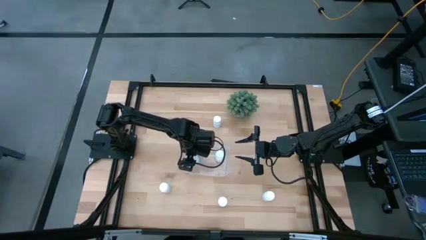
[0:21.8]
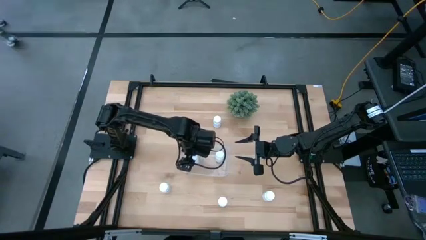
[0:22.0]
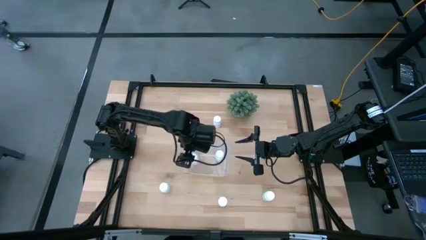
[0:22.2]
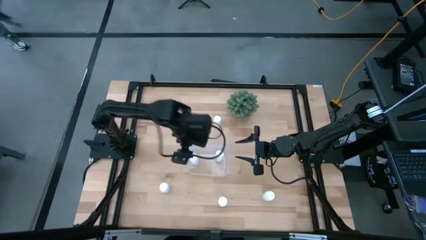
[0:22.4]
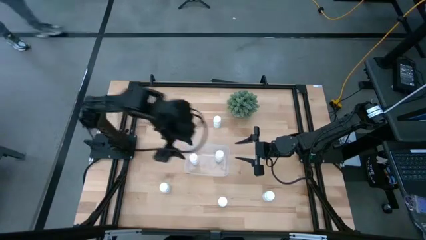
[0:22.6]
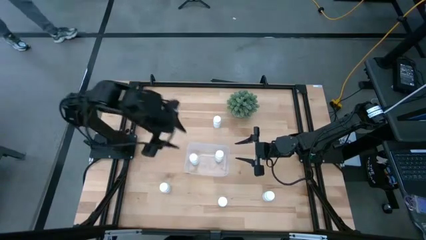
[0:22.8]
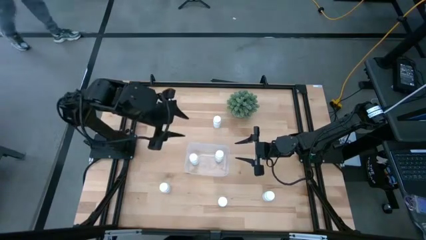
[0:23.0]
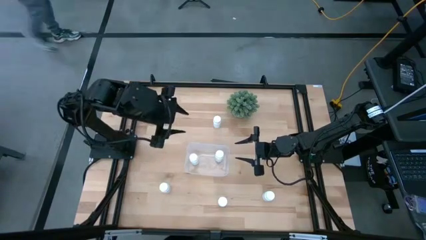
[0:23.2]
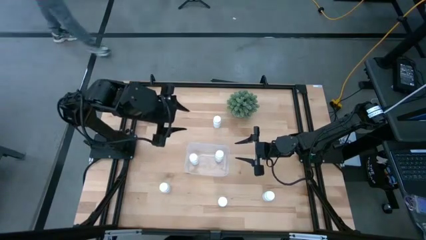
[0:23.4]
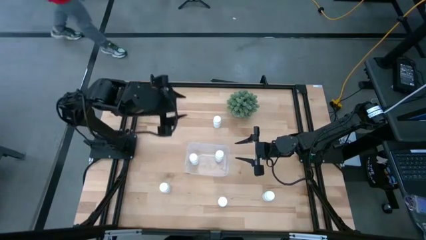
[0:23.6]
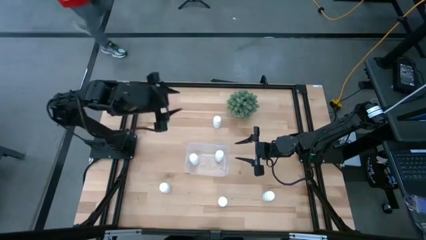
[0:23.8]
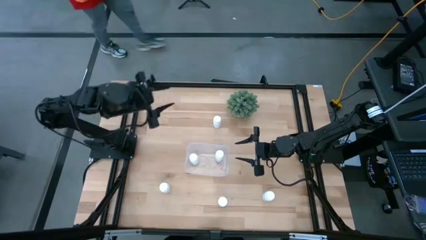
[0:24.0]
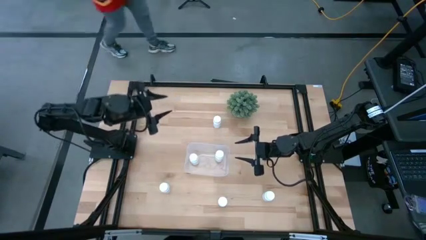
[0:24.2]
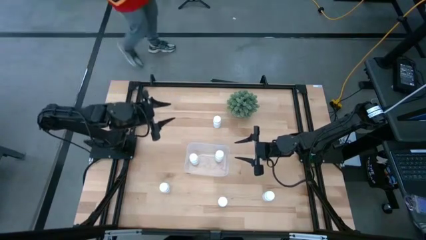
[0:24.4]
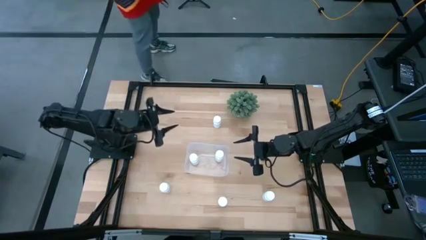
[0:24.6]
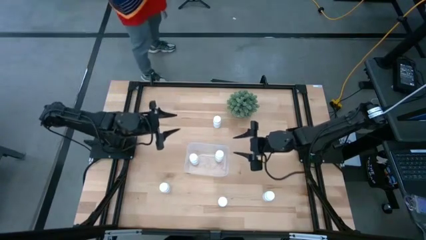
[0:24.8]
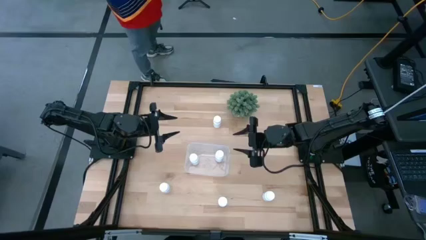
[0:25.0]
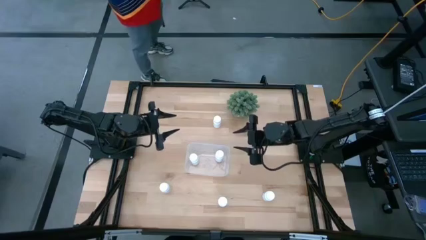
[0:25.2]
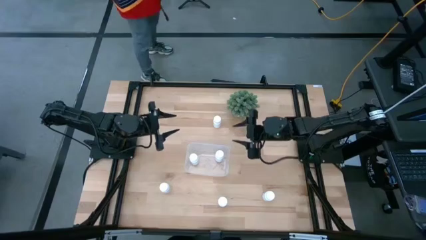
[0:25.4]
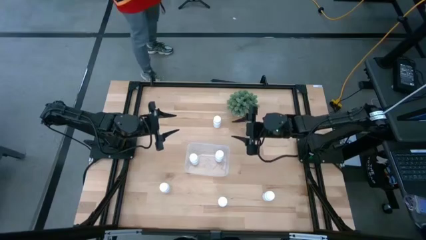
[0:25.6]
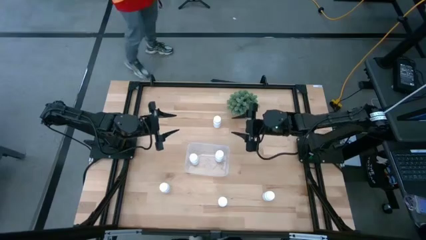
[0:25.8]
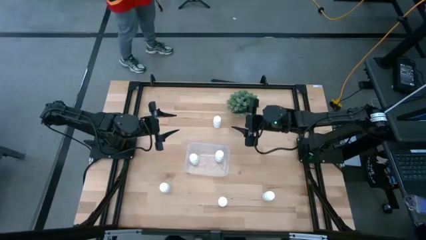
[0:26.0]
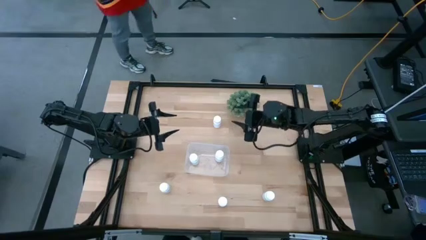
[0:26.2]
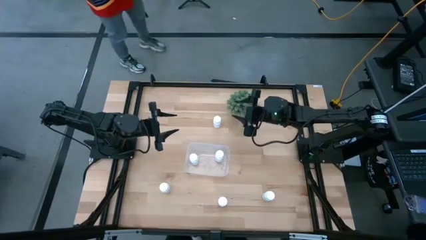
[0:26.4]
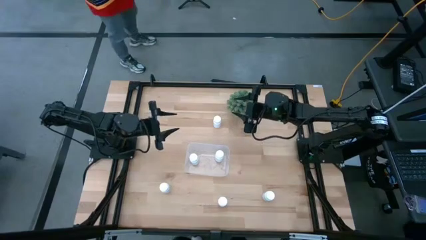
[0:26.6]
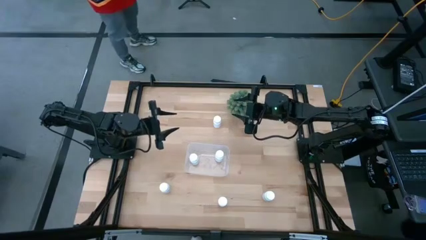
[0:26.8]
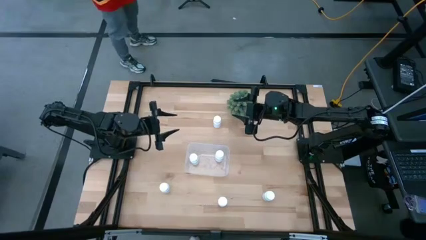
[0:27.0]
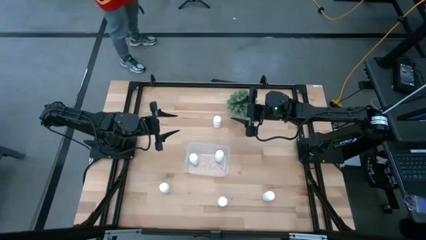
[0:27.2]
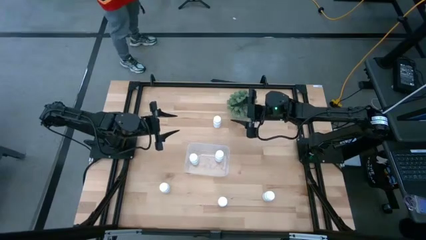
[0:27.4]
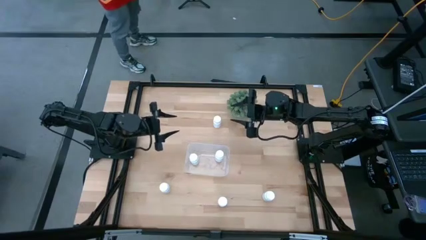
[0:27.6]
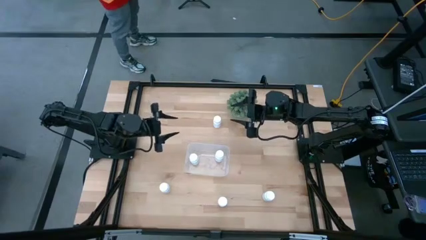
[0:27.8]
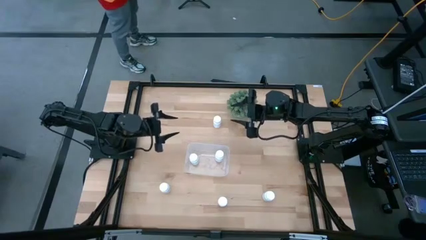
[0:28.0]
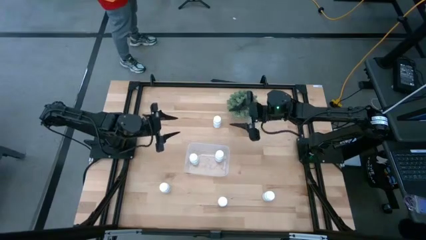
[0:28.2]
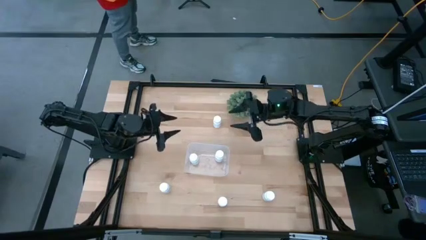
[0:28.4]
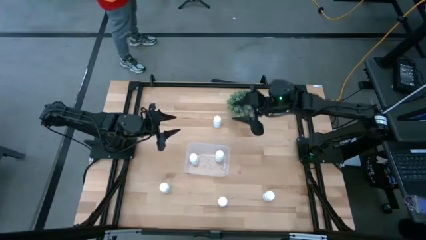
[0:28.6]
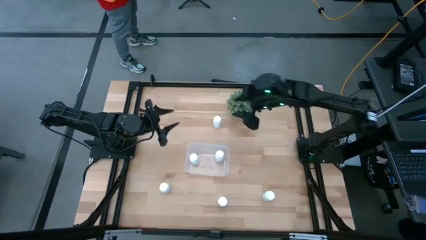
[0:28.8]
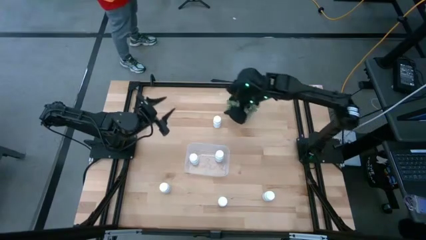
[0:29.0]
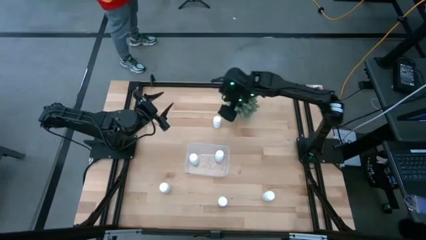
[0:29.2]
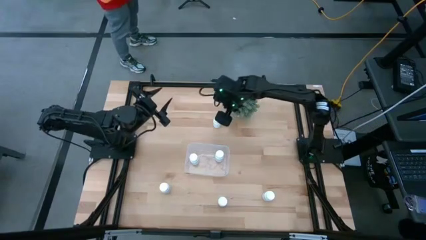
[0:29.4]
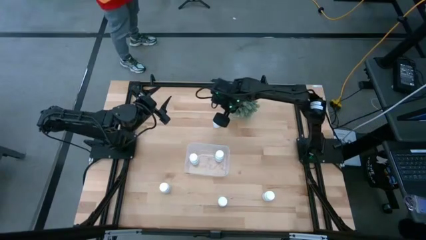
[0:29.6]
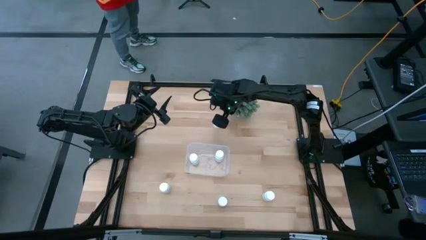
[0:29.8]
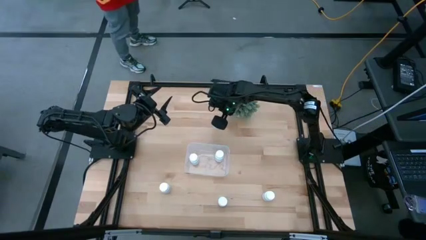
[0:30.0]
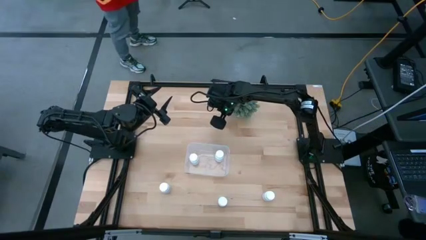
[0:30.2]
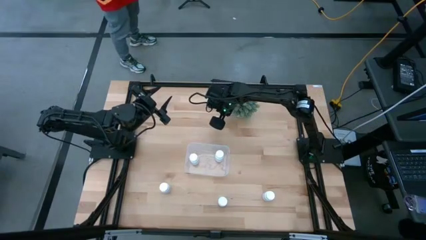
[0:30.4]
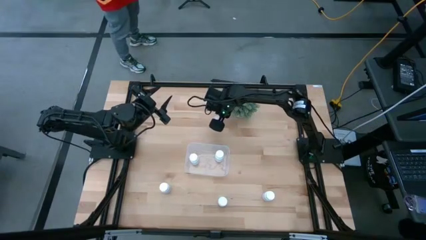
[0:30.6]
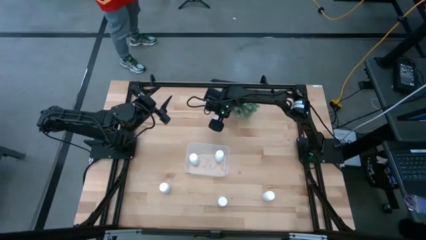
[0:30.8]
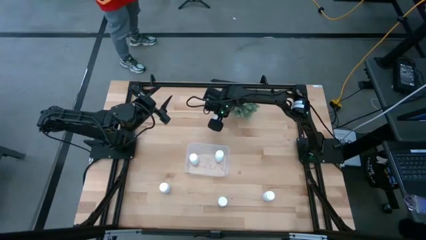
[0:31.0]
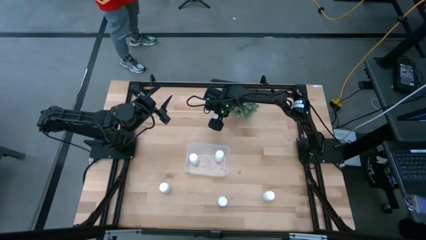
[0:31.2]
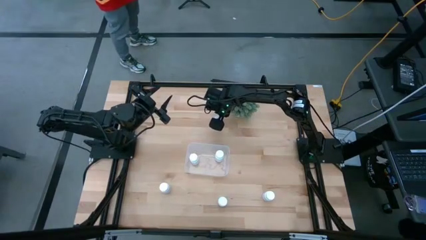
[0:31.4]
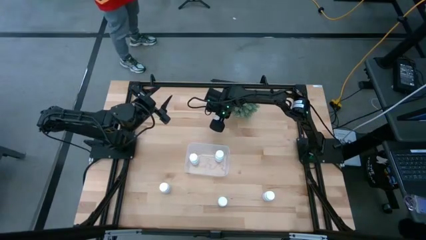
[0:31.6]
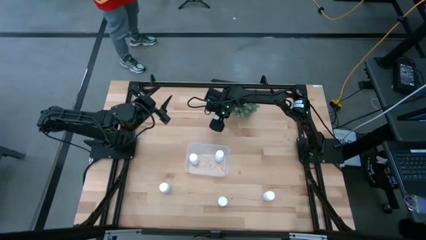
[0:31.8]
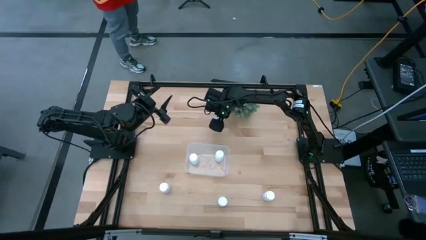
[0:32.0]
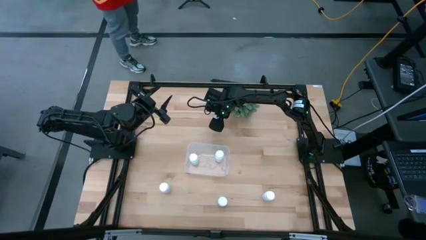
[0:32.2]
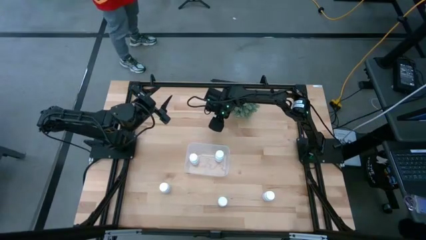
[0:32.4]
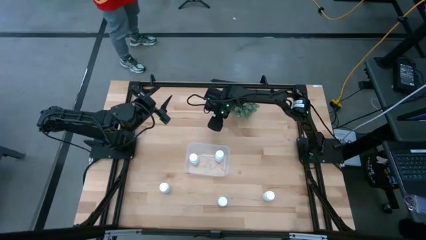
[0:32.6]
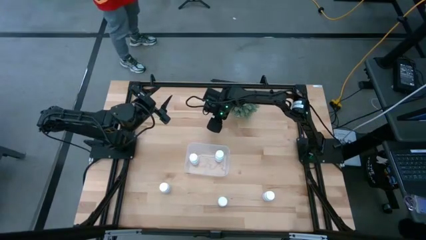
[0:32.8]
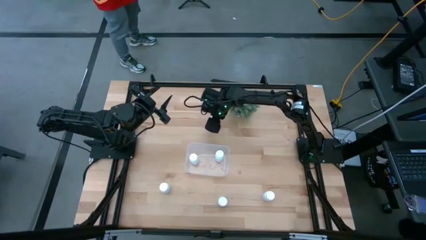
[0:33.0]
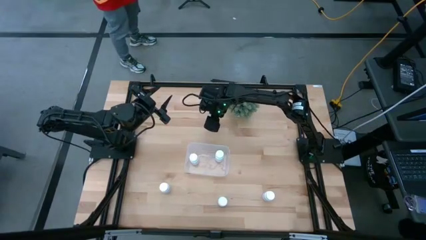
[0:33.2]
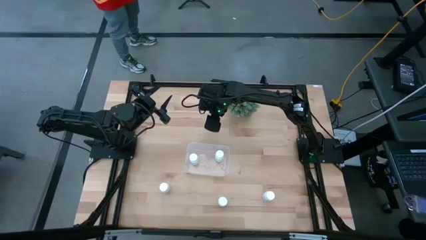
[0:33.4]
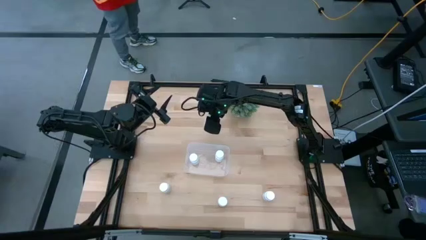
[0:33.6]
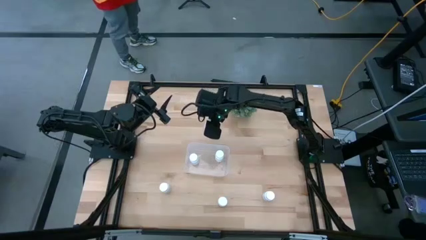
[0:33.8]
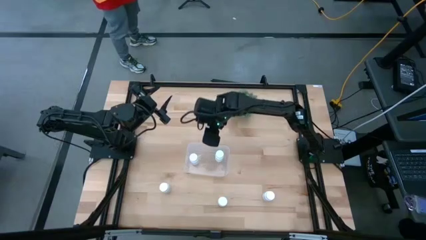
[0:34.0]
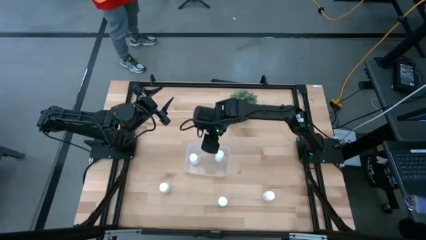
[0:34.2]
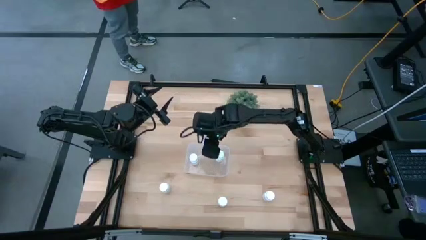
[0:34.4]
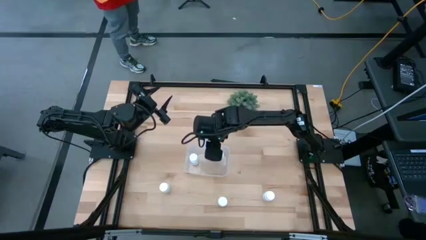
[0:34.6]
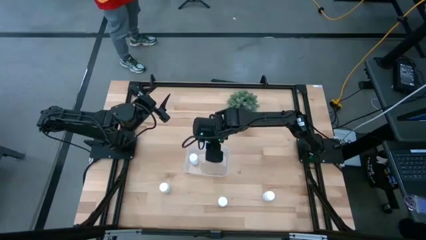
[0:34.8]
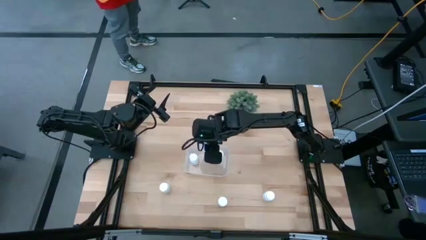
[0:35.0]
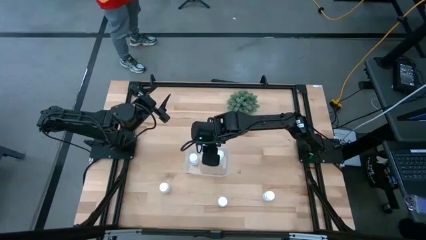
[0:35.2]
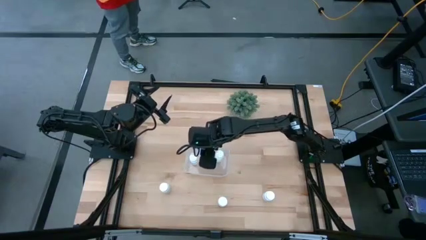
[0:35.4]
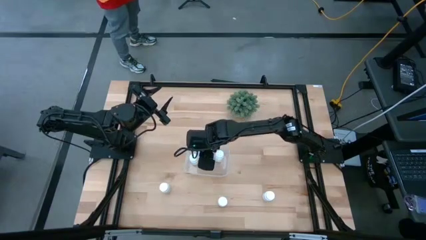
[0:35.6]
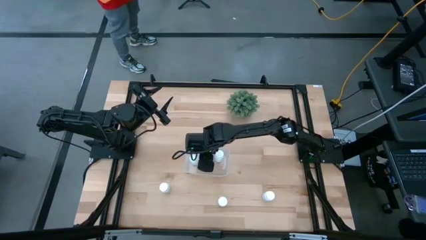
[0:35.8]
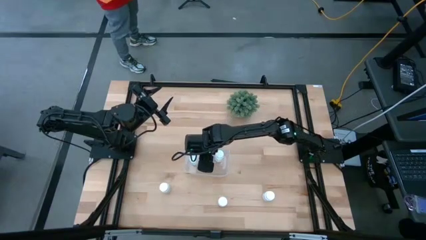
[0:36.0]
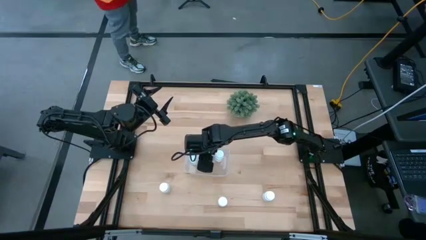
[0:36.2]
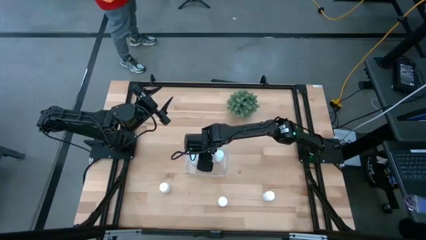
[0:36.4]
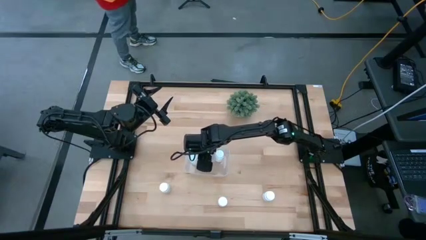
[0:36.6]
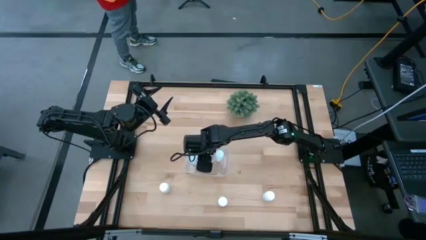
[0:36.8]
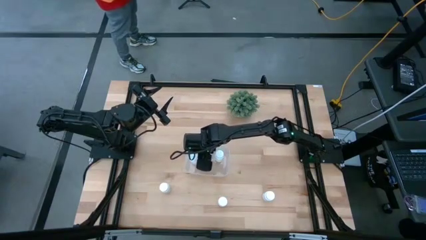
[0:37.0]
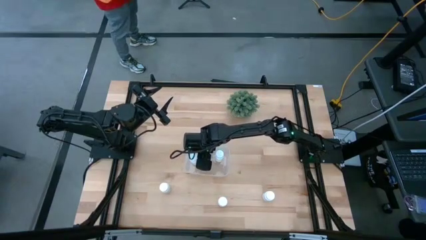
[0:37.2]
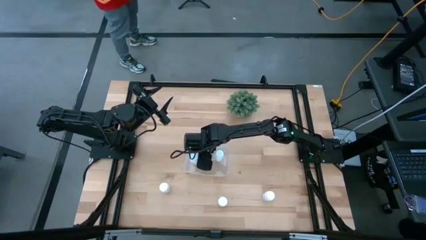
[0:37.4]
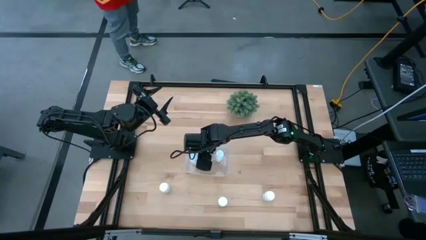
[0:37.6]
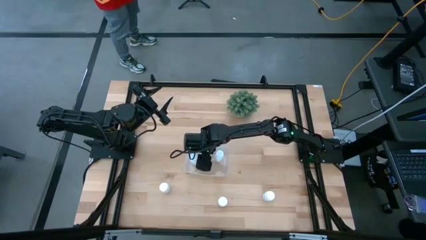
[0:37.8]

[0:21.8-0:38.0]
Task: Pick and place pill bottles into a basket
Put the white medicine bottle into the transparent bin

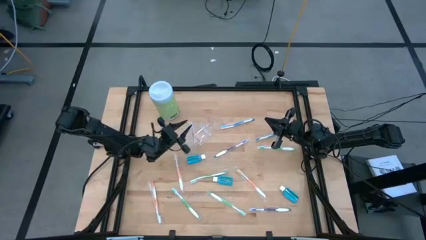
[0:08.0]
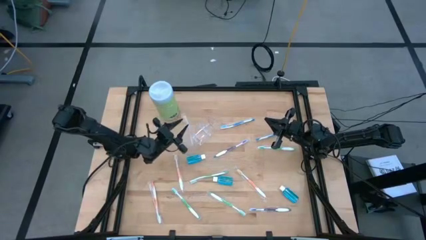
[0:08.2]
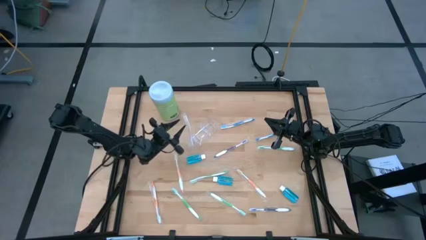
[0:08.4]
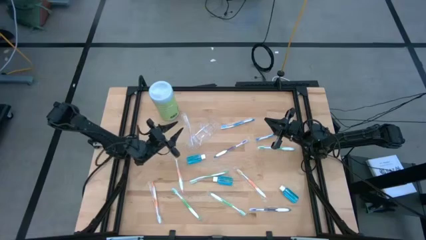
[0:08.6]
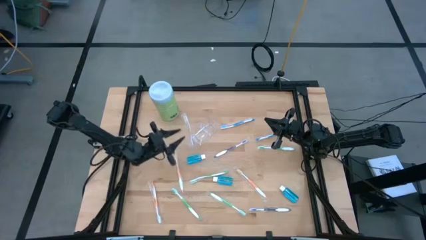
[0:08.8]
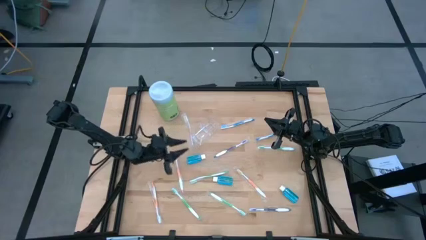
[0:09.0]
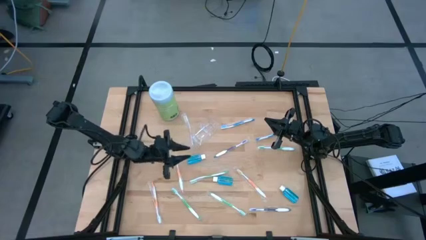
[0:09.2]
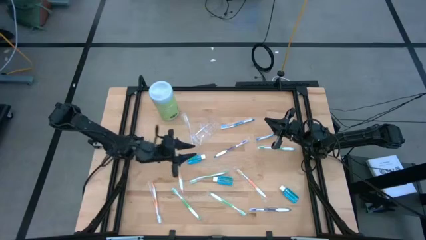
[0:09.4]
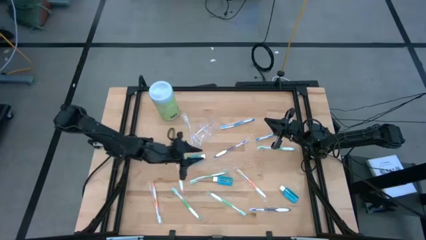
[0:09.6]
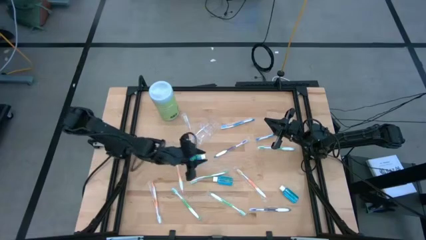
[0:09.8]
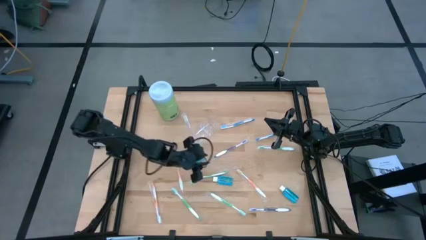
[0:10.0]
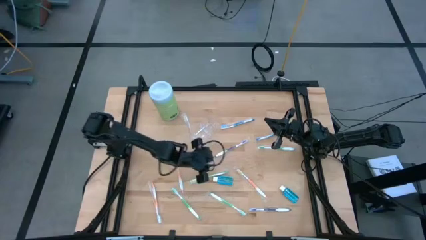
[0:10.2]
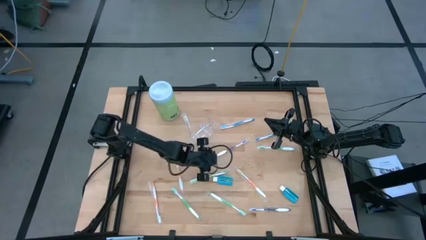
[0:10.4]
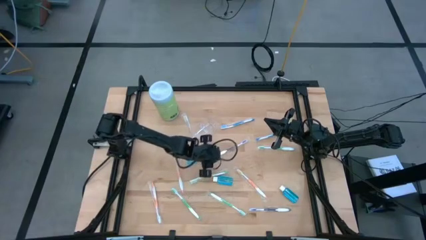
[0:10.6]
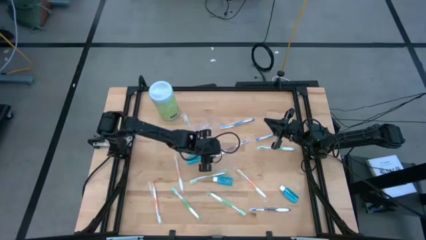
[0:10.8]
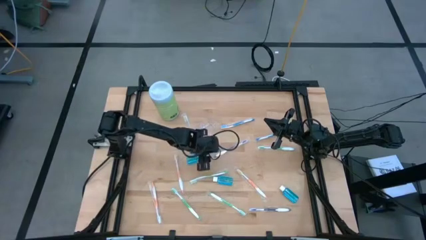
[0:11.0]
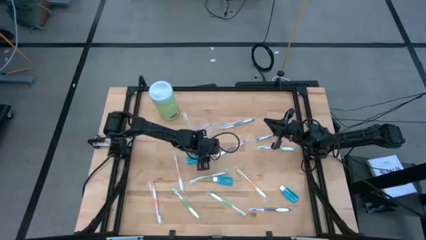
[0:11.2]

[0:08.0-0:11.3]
Task: Pick & Place toothbrushing station
Put the blue mouthwash into the transparent organizer
